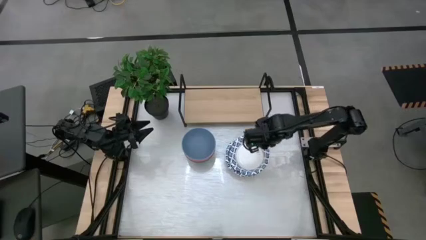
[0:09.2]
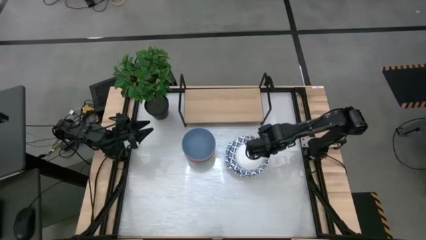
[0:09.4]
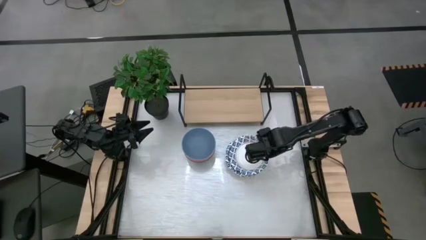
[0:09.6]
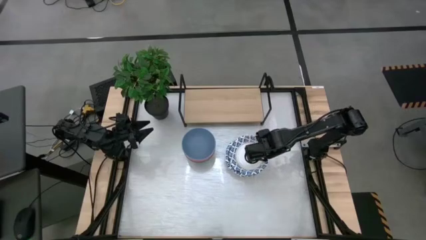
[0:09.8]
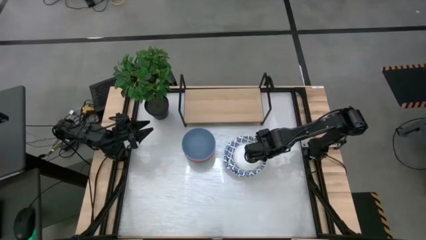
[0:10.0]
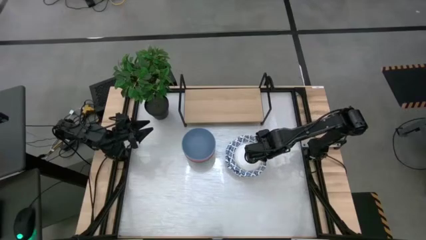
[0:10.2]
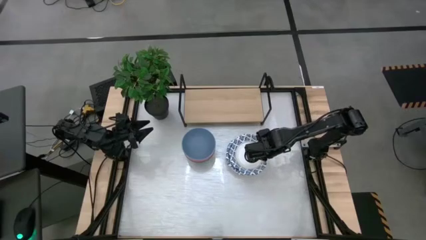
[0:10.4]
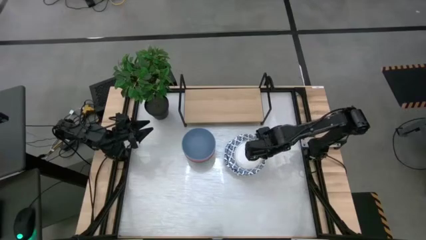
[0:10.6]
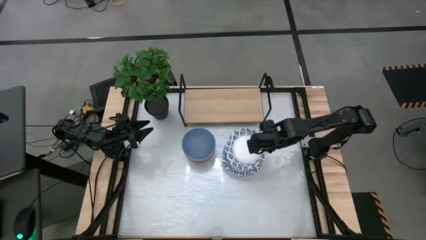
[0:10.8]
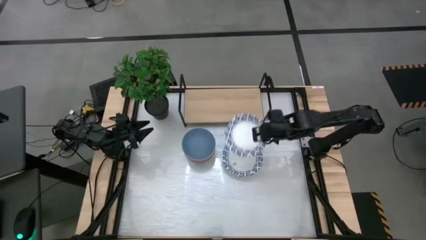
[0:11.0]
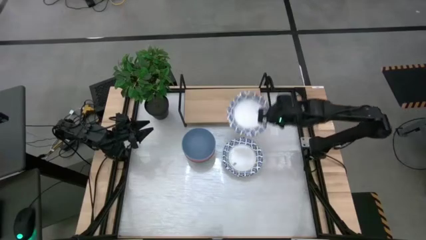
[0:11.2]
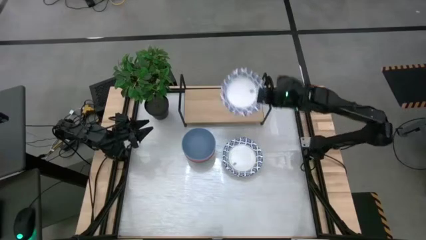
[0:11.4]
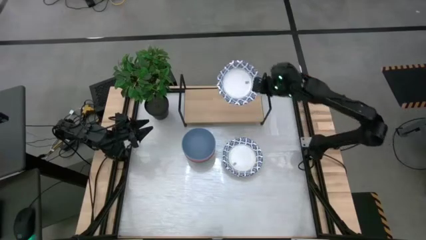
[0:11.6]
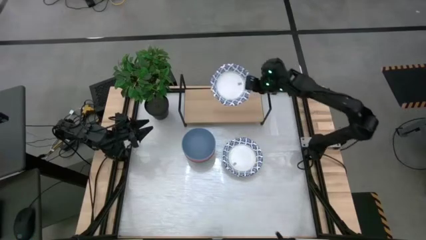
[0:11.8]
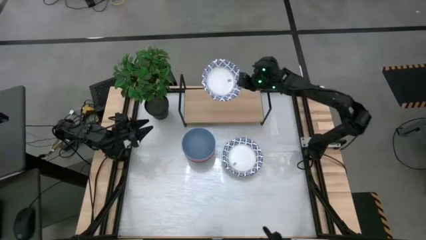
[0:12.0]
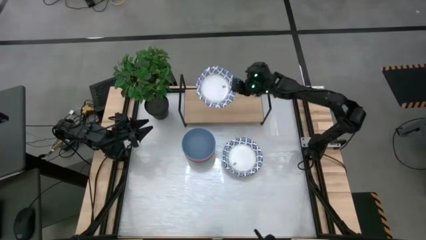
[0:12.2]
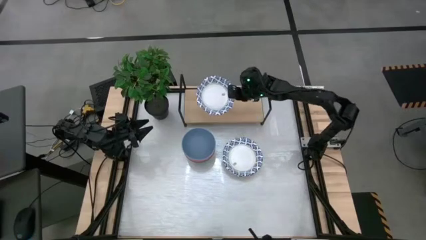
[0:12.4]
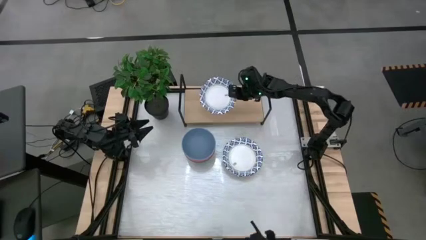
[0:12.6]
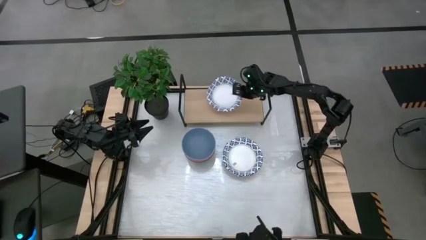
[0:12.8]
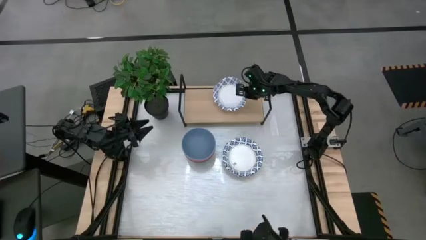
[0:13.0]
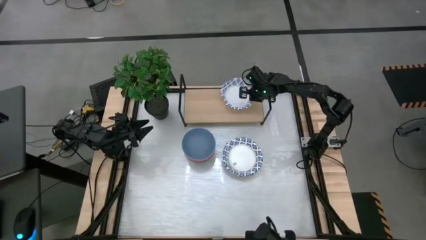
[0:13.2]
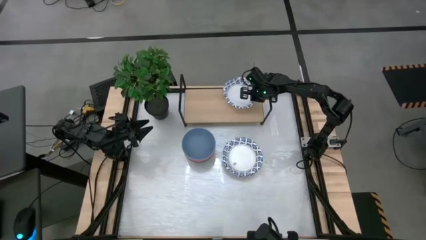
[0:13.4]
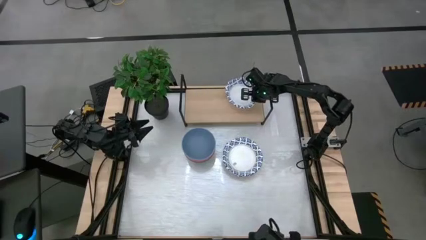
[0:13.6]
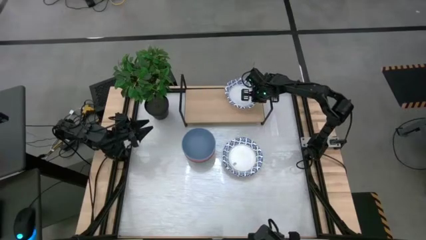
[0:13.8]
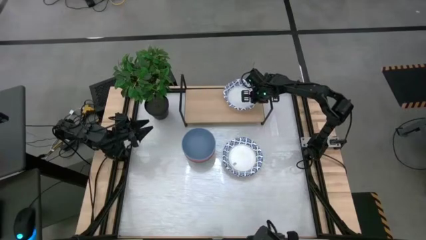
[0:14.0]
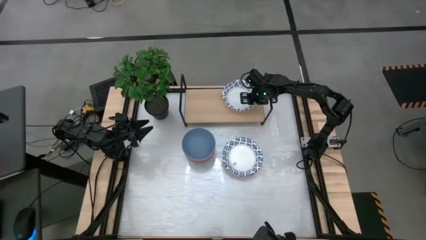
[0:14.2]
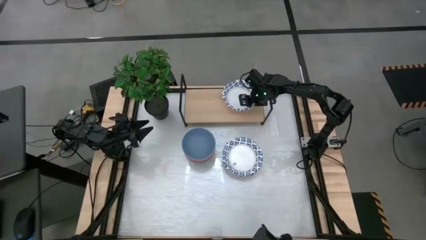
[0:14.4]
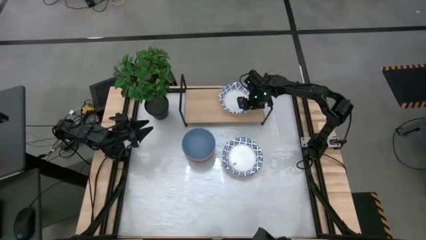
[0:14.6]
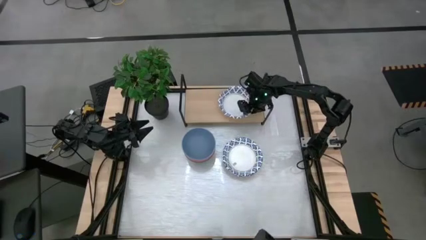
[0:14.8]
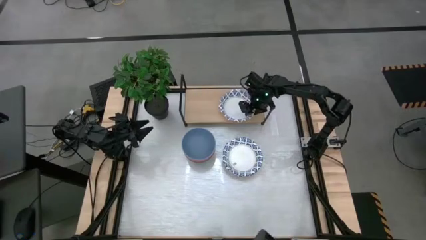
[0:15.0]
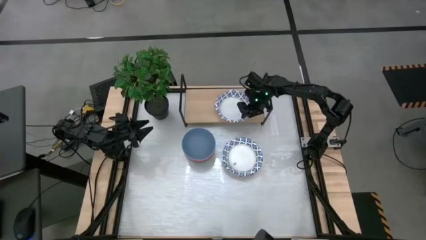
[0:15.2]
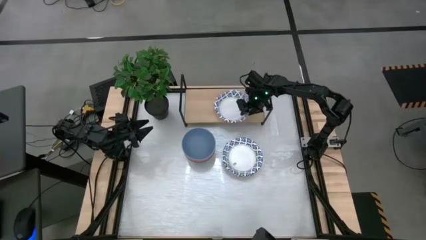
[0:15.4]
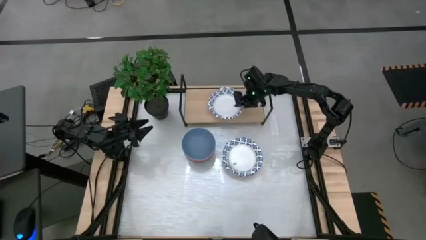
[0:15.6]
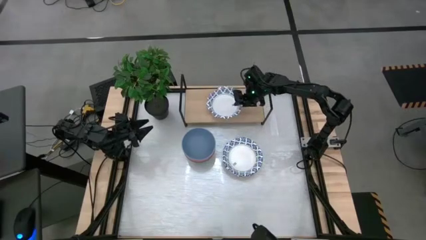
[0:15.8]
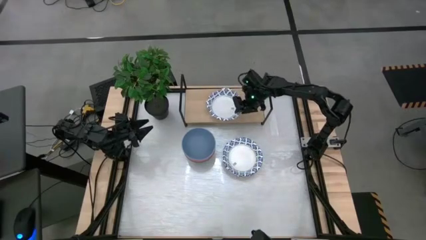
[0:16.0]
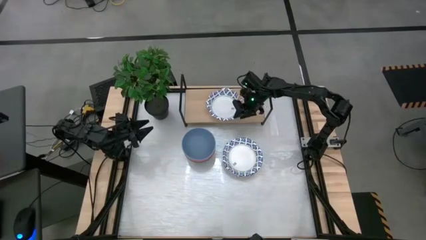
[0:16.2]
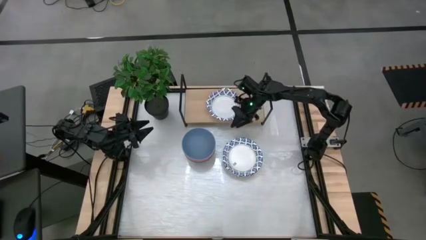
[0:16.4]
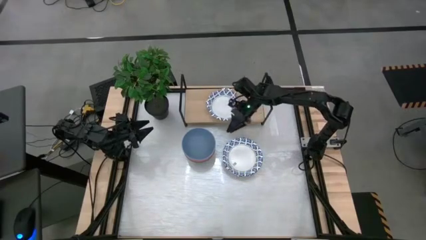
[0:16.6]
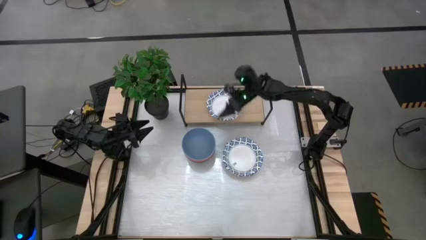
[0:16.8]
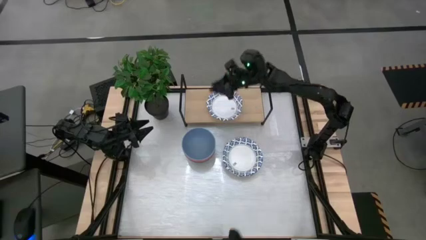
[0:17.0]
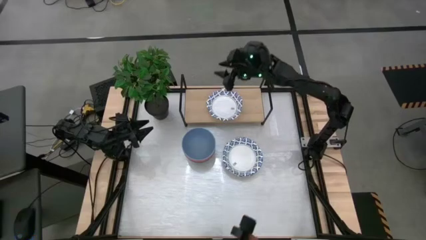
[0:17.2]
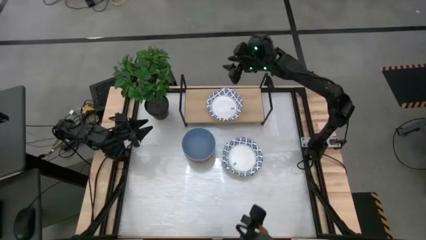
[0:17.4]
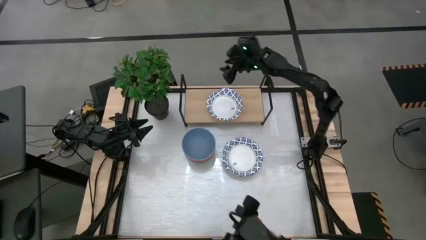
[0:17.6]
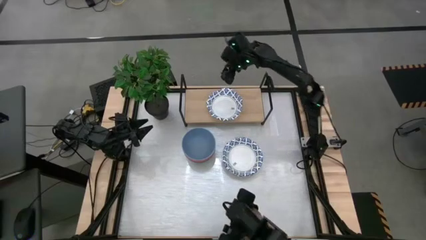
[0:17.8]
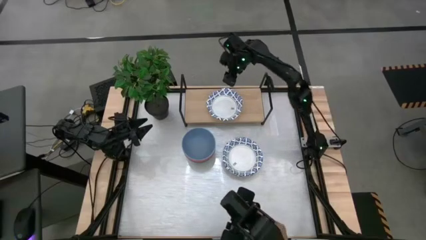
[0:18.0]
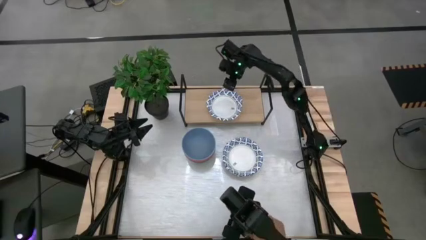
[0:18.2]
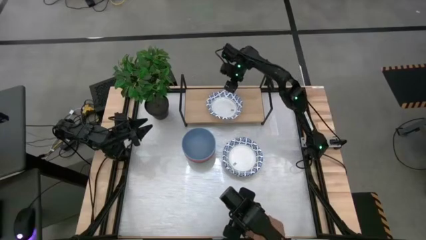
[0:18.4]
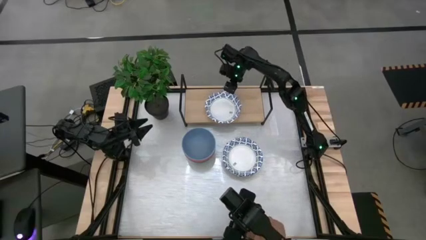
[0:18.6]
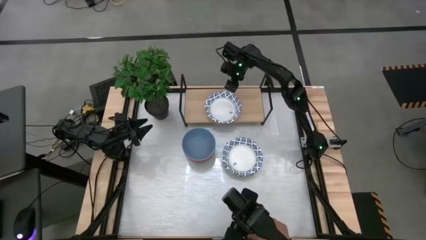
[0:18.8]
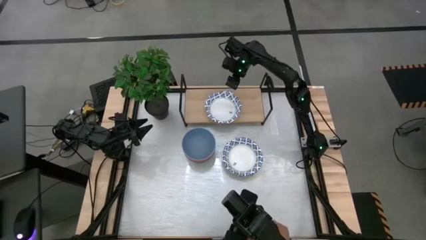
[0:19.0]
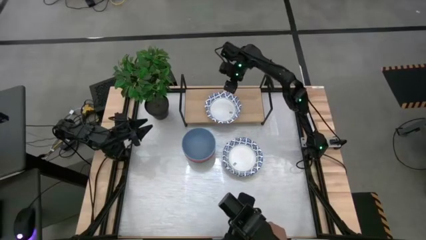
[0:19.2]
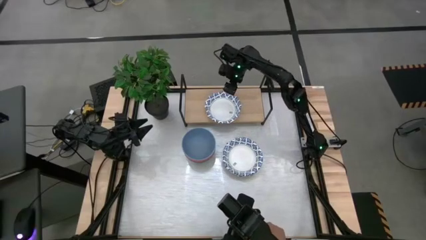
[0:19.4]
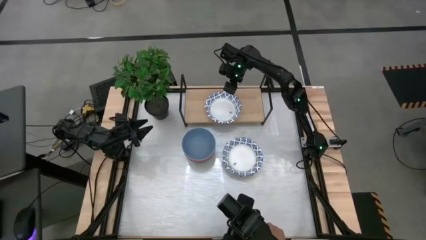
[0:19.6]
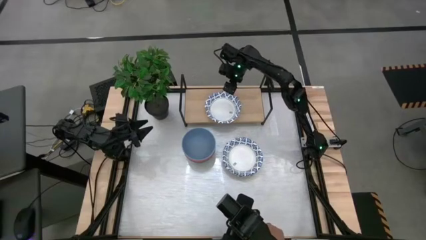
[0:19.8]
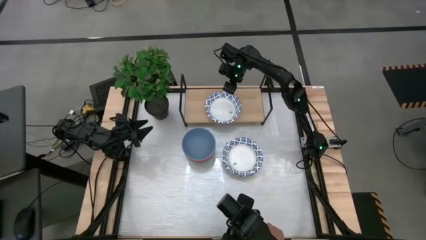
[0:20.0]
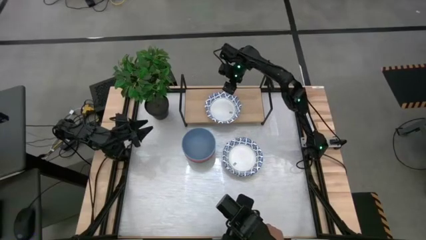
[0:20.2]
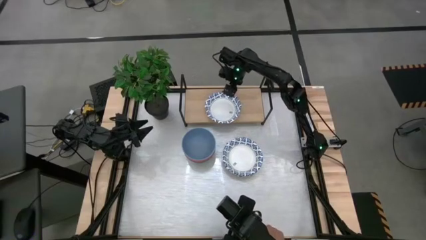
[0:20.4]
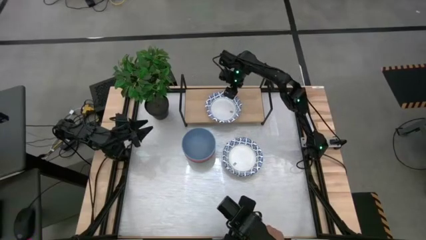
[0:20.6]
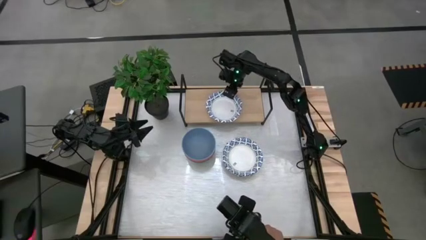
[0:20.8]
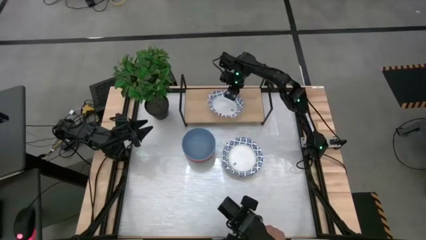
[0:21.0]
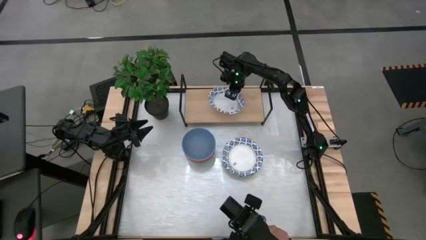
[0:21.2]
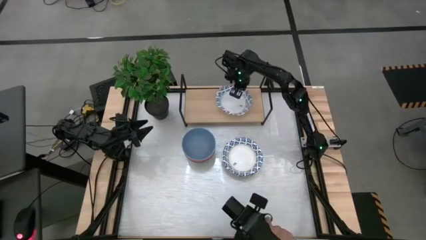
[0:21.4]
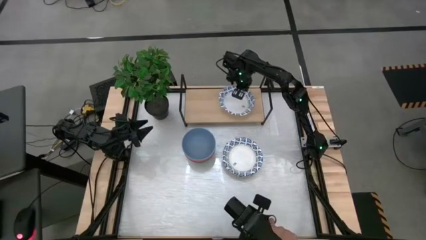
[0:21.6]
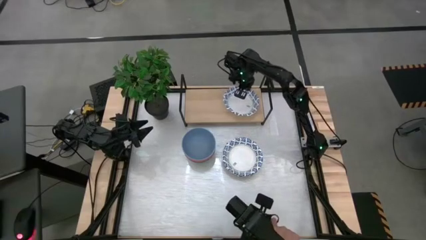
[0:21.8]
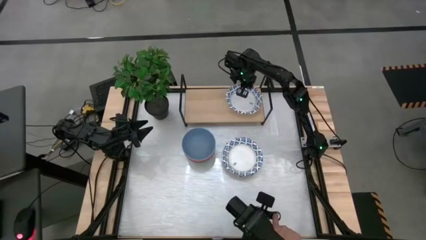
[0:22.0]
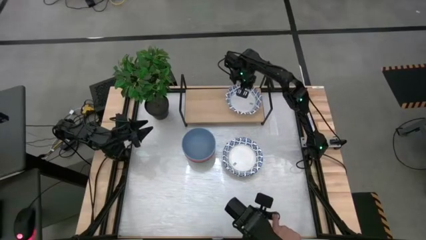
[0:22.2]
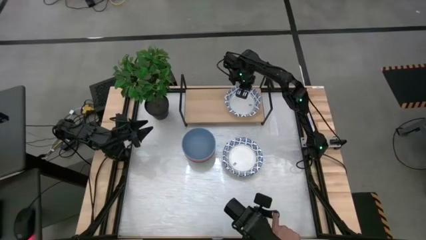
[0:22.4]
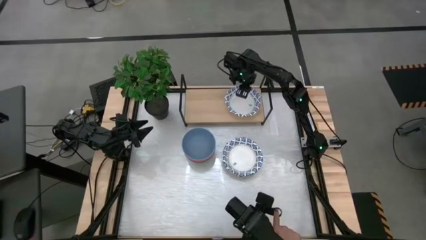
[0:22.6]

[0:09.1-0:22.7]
Task: Place and stack bowls onto a shelf
Put the blue patterned bowl on the shelf

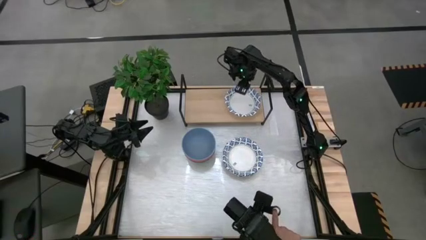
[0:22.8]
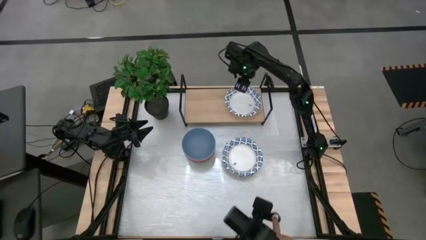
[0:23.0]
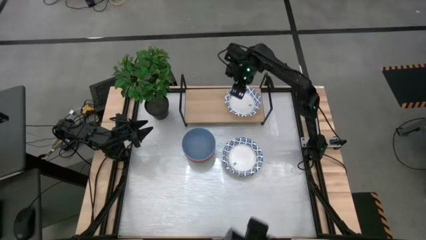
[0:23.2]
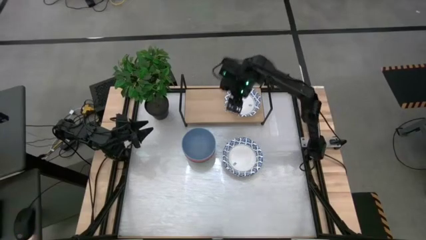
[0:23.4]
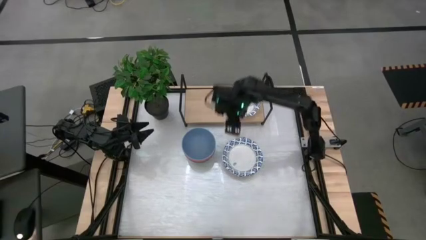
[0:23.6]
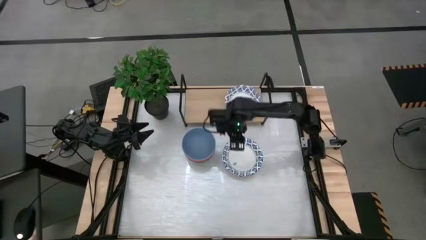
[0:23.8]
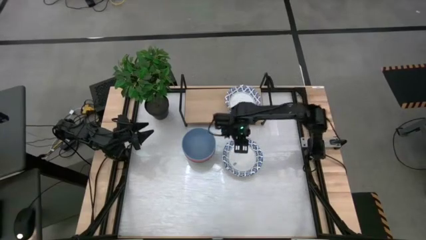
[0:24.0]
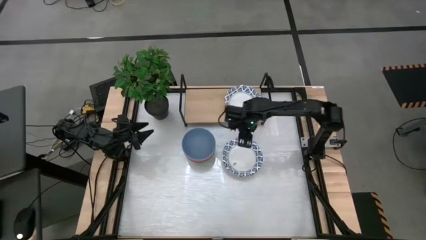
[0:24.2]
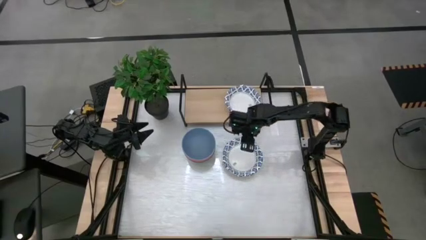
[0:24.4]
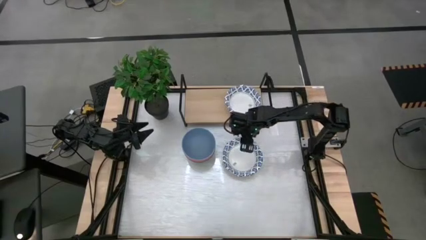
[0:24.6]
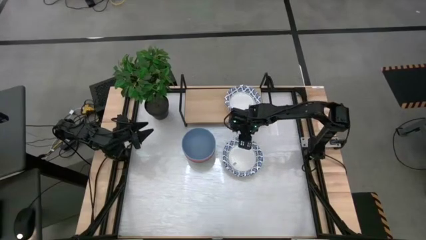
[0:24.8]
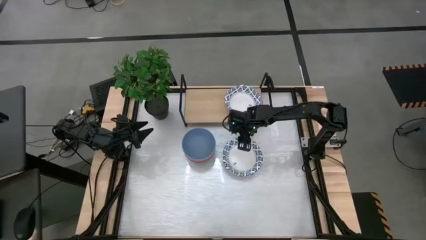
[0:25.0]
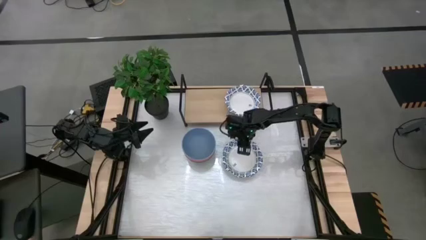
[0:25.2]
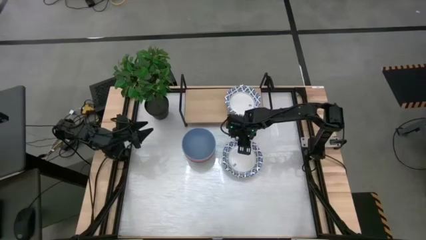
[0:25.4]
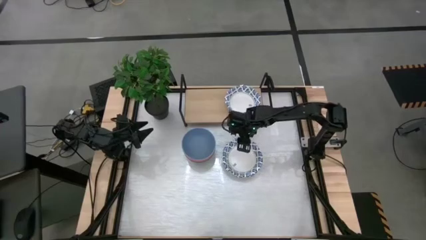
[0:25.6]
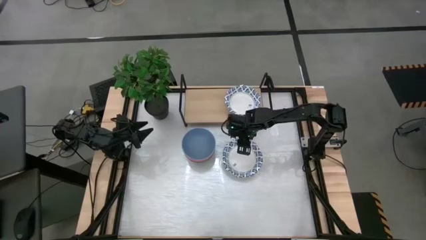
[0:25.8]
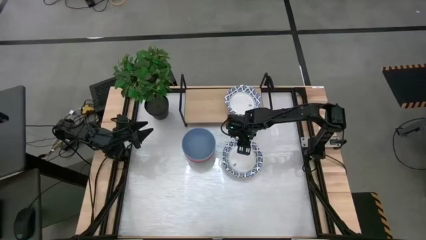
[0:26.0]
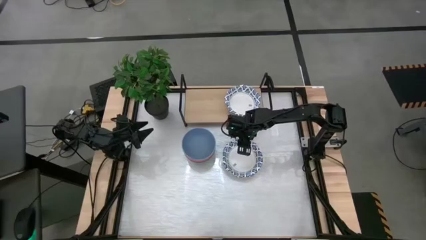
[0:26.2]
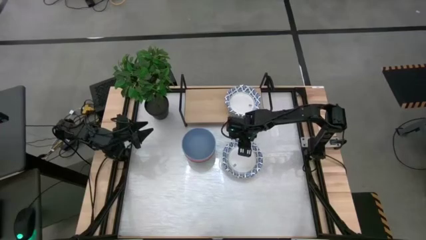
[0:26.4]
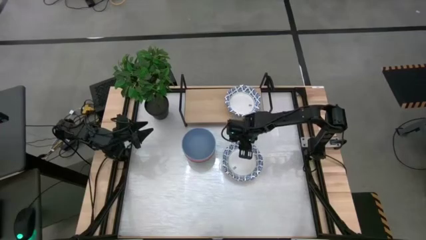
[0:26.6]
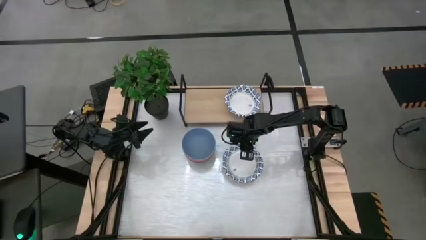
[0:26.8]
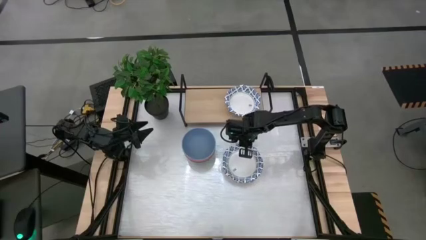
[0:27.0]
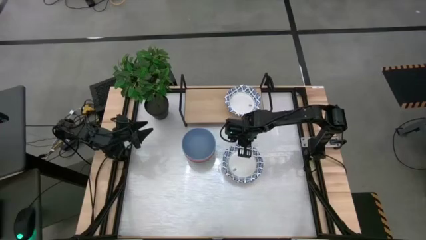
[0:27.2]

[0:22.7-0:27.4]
Stack the blue patterned bowl on top of the blue patterned bowl on the shelf
